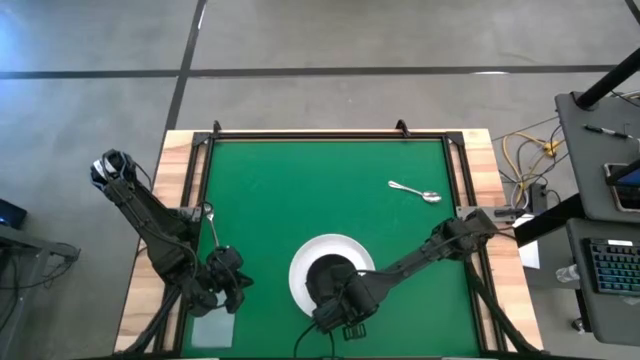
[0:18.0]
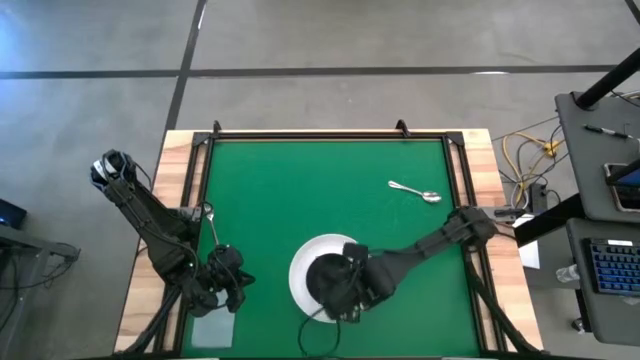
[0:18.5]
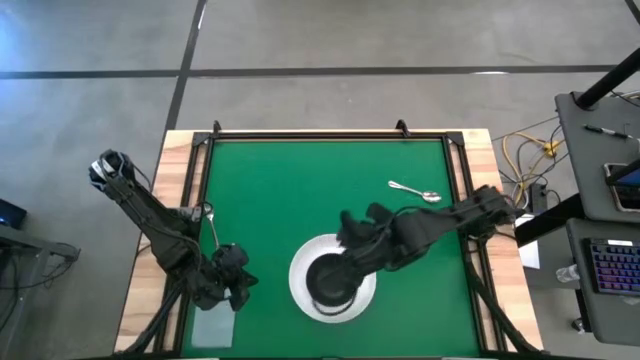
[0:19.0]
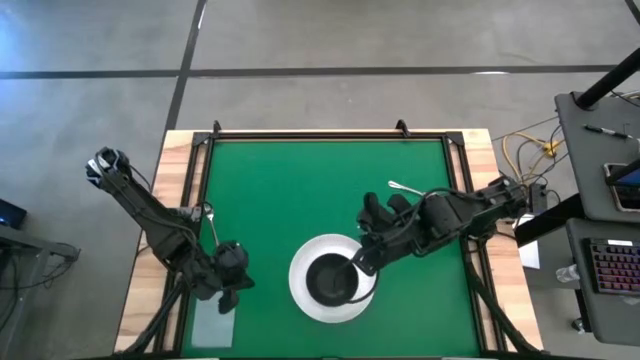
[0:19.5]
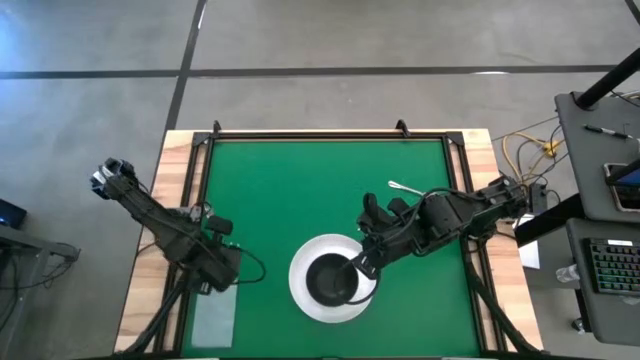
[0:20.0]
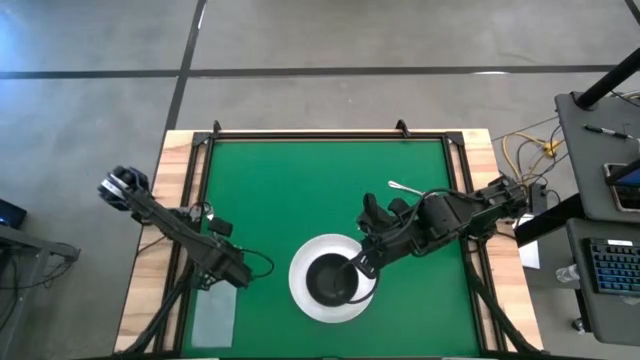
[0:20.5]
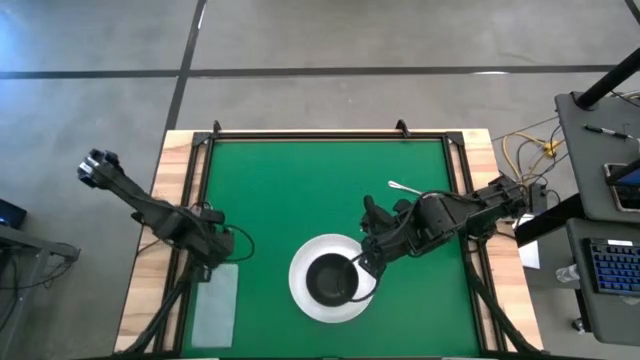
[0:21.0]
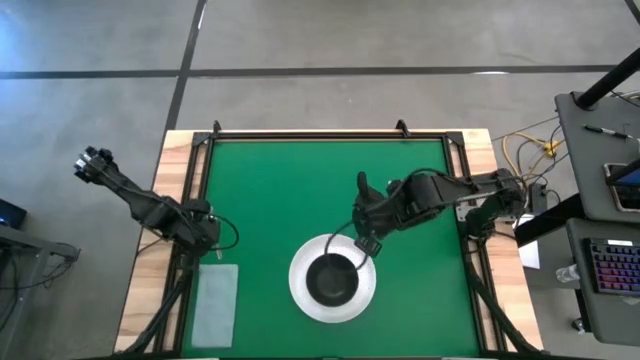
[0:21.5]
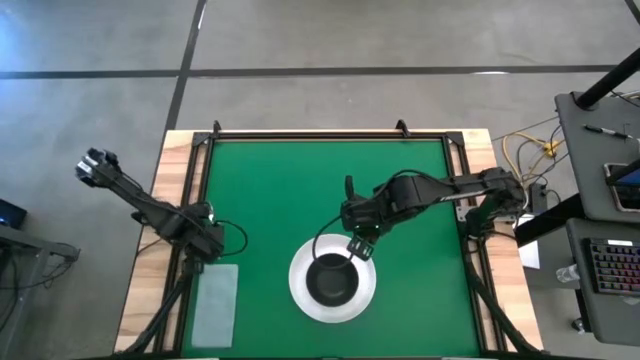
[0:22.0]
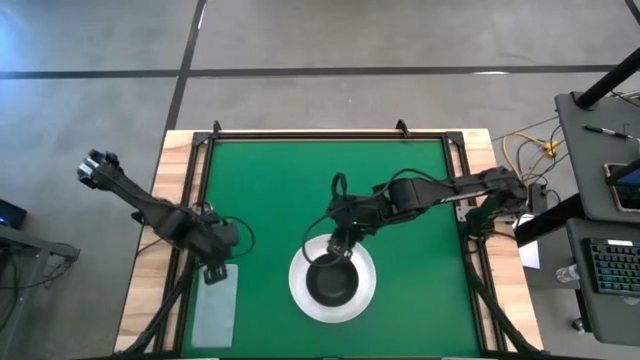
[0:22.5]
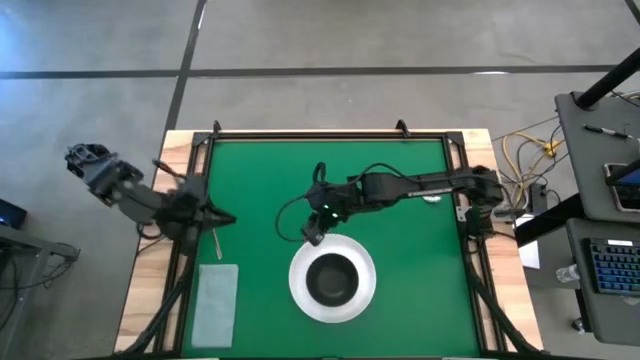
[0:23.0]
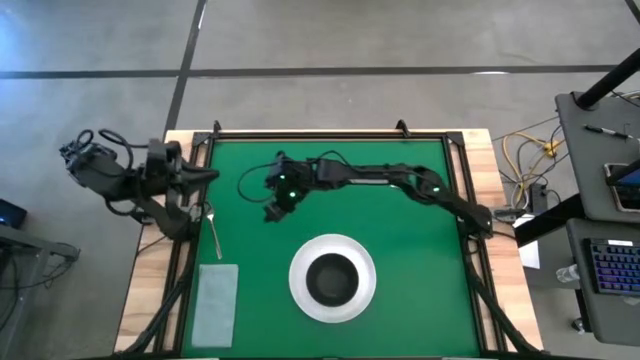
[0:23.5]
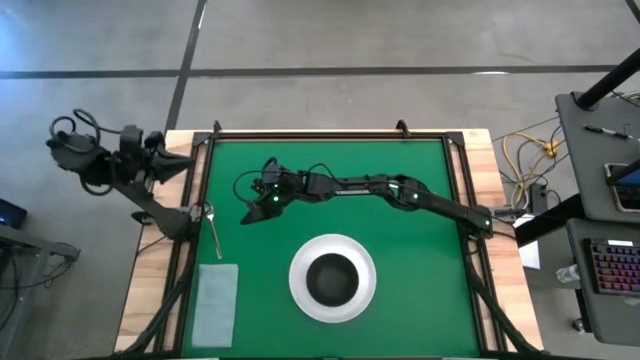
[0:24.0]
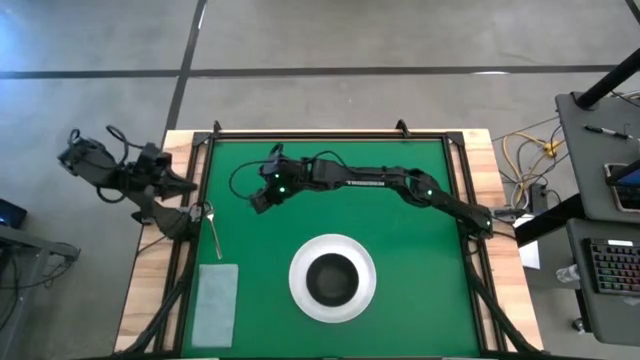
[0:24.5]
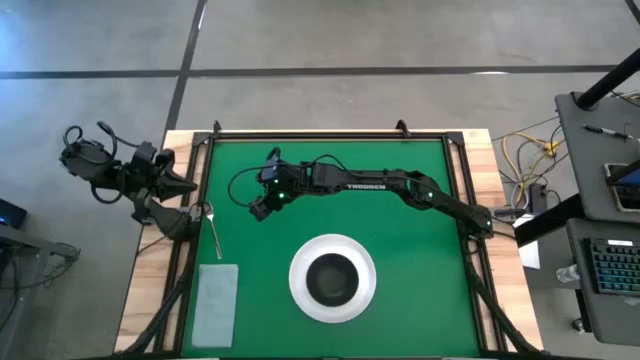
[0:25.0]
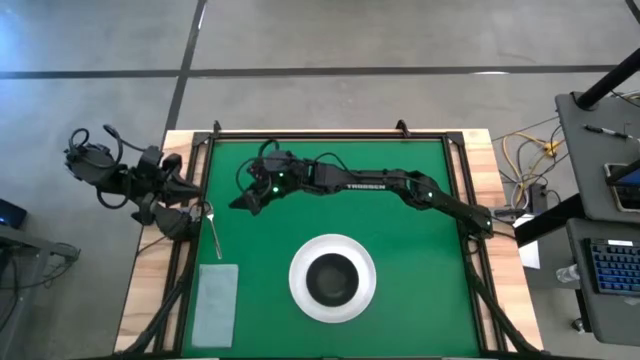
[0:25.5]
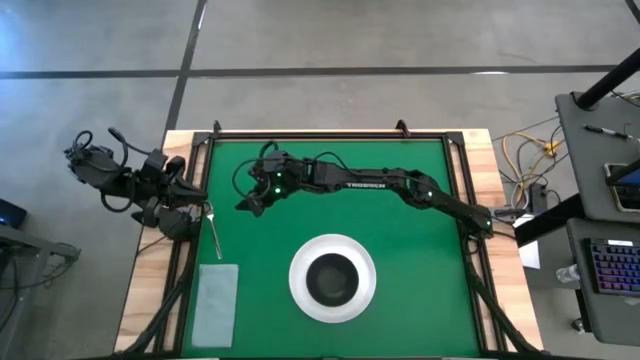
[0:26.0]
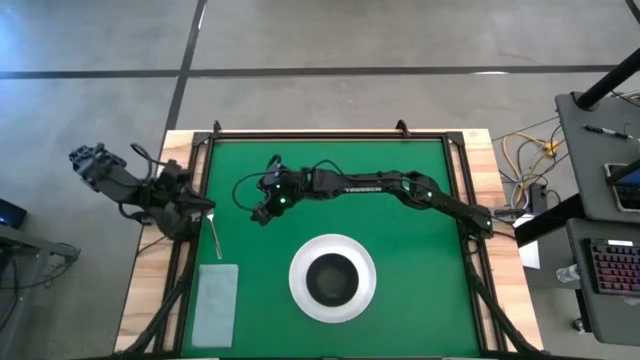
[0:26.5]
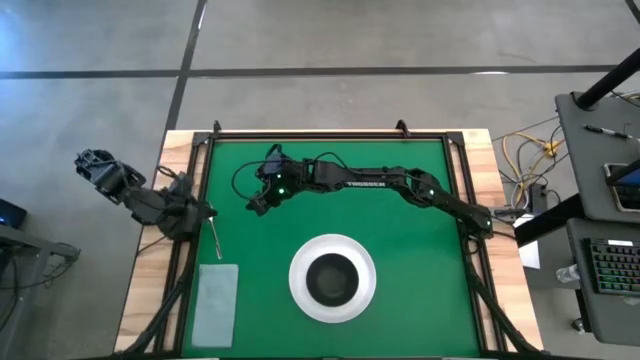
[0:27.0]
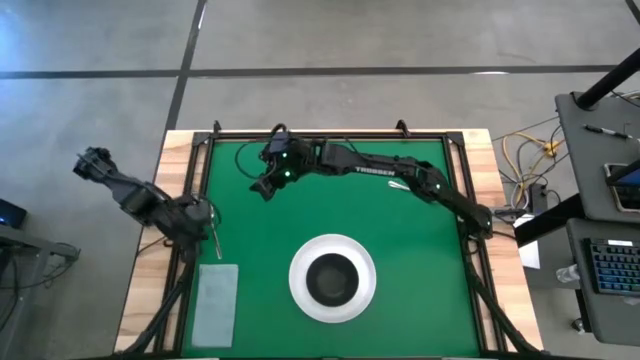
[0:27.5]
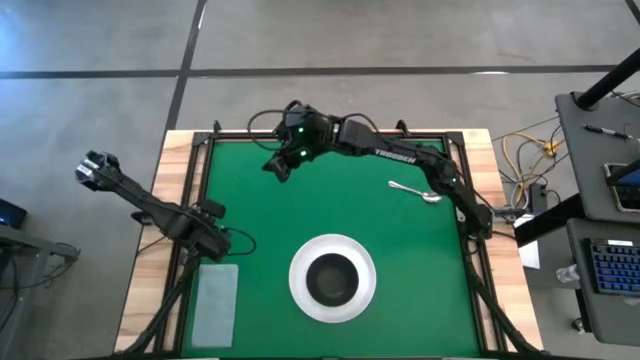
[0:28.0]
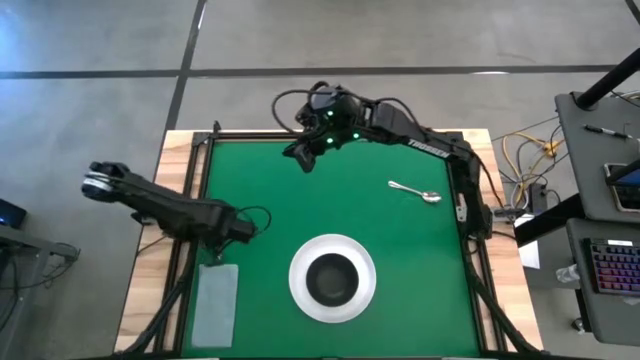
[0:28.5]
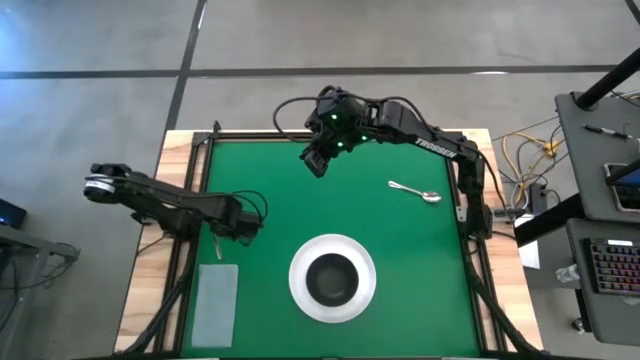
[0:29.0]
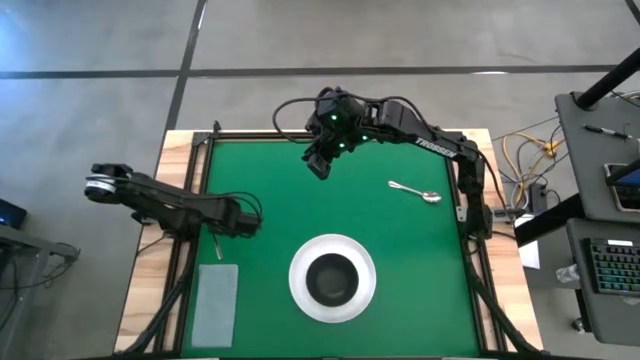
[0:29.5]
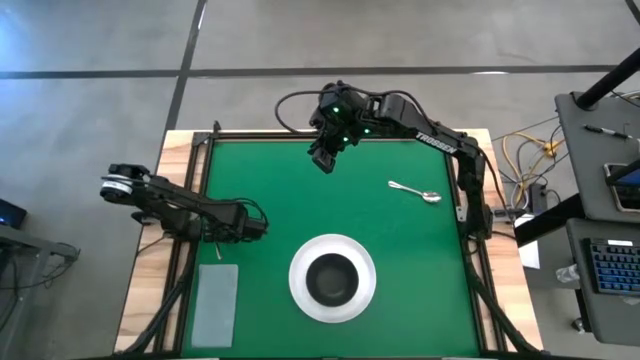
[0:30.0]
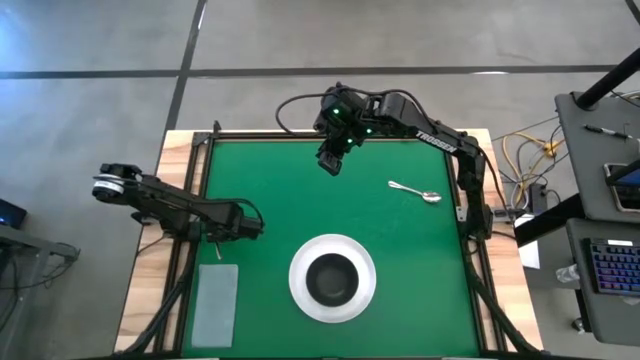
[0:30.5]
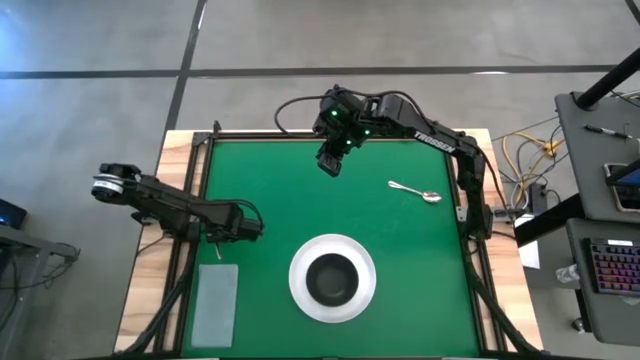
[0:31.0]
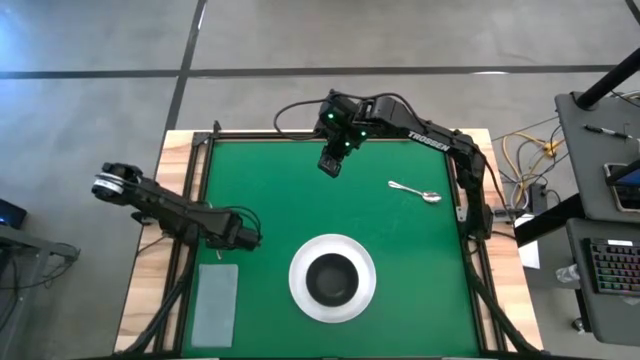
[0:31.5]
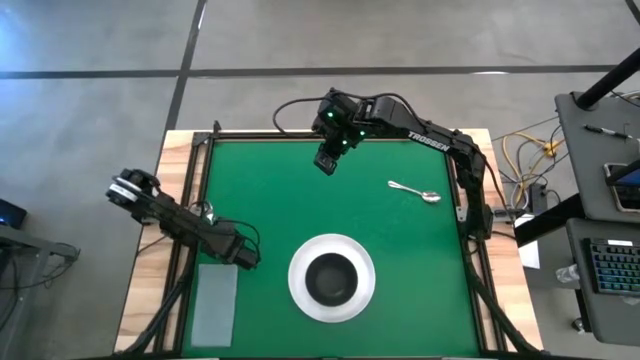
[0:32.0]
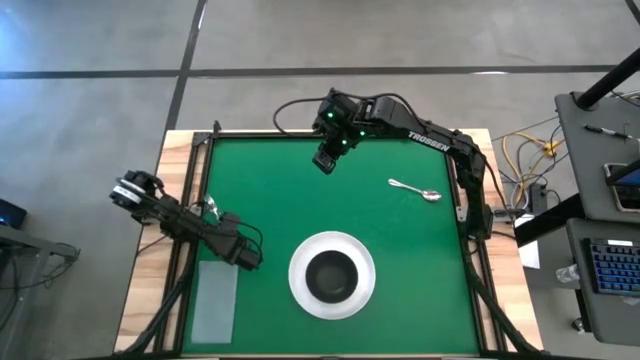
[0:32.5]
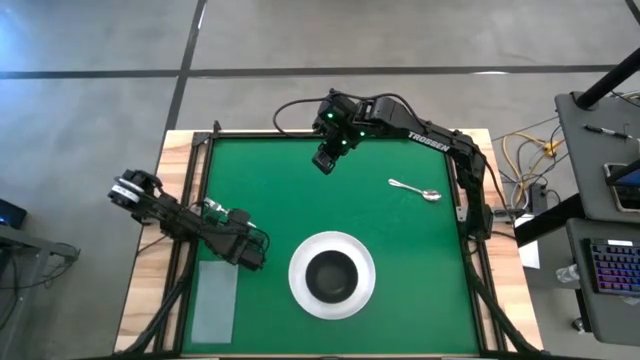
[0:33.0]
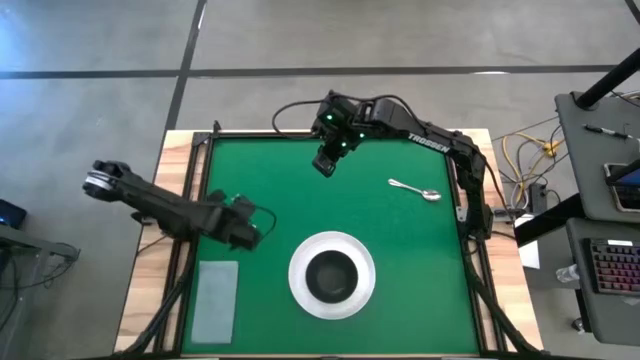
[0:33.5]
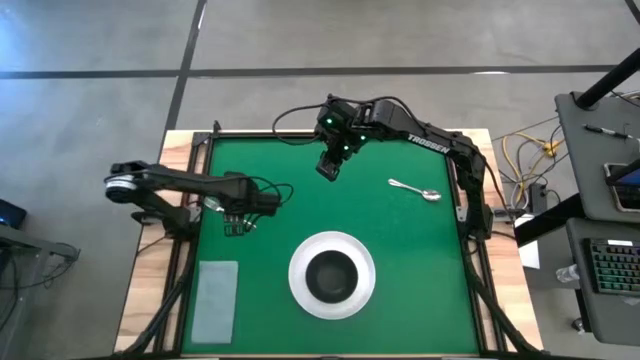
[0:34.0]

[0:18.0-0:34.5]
Task: Set table place
Put the fork beside the white plate on the table

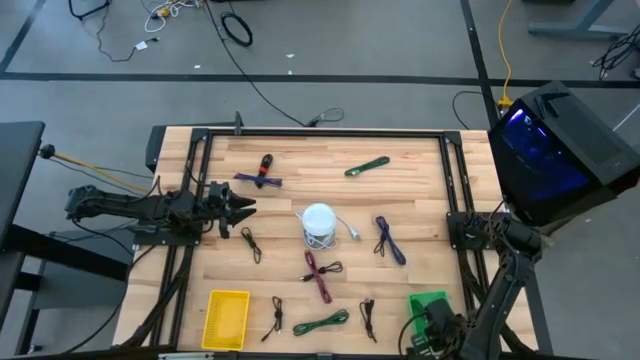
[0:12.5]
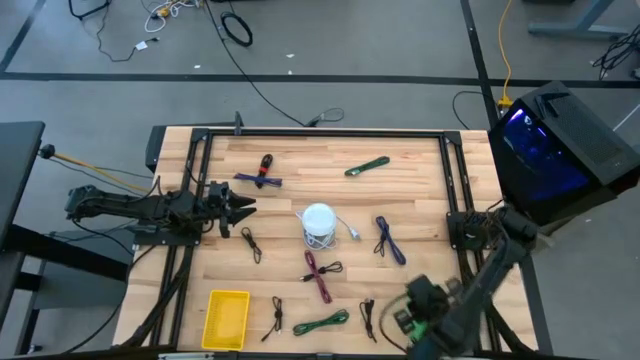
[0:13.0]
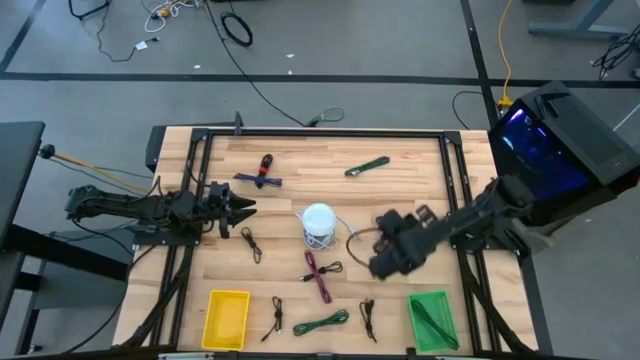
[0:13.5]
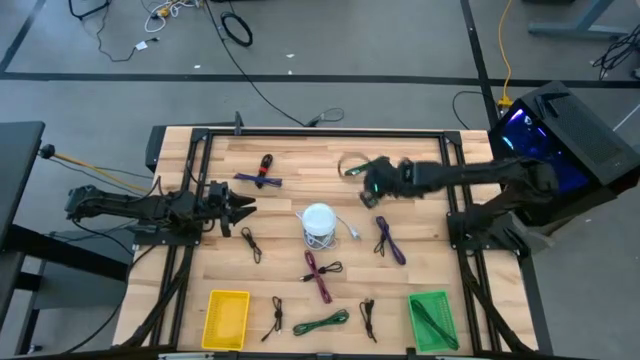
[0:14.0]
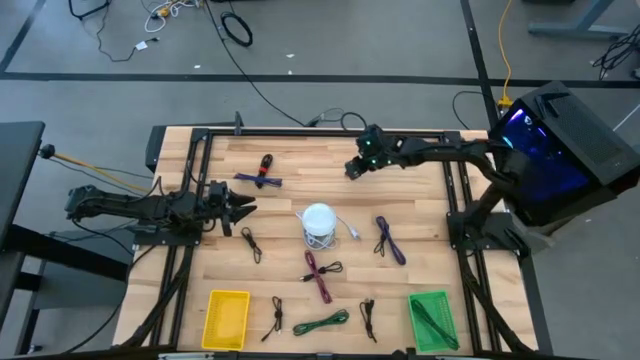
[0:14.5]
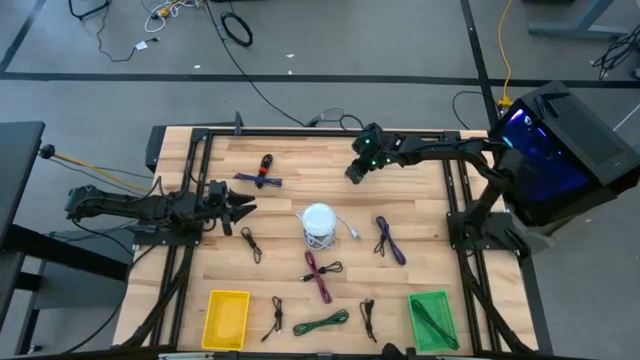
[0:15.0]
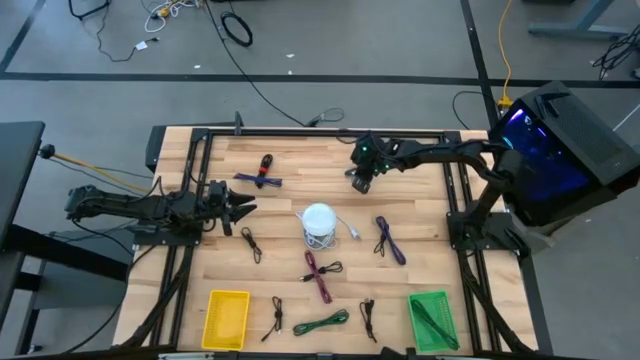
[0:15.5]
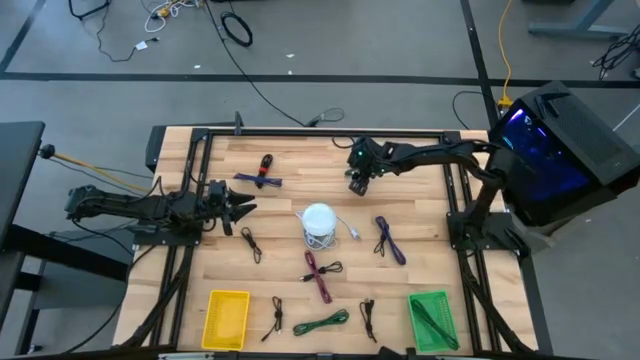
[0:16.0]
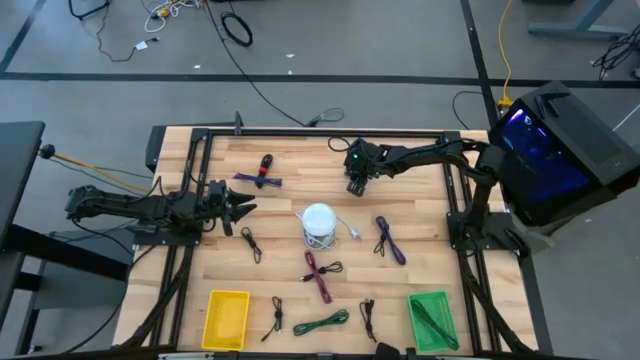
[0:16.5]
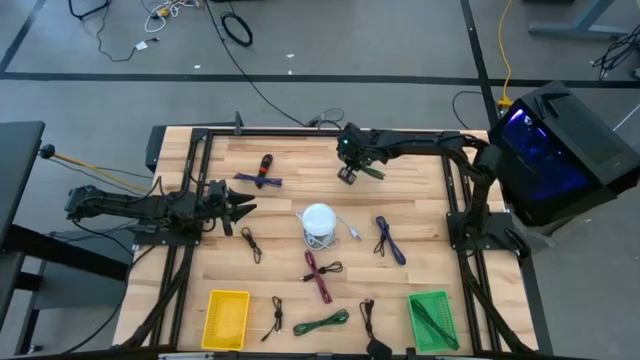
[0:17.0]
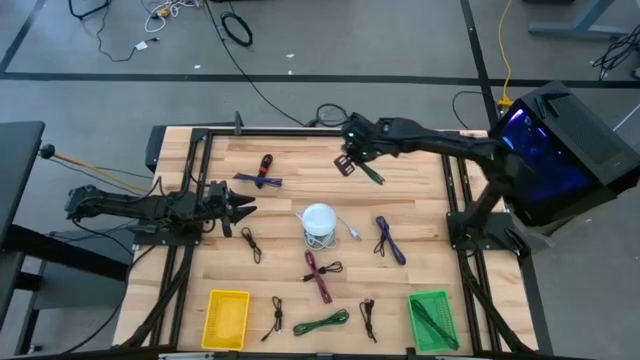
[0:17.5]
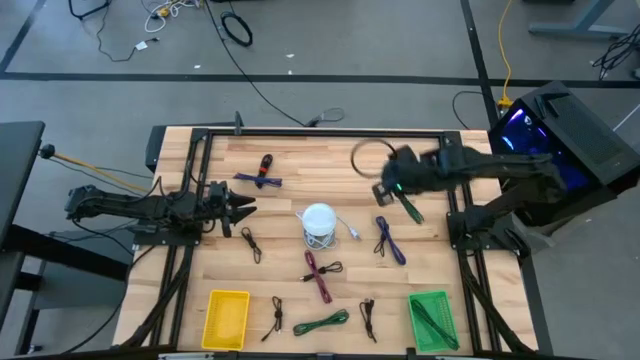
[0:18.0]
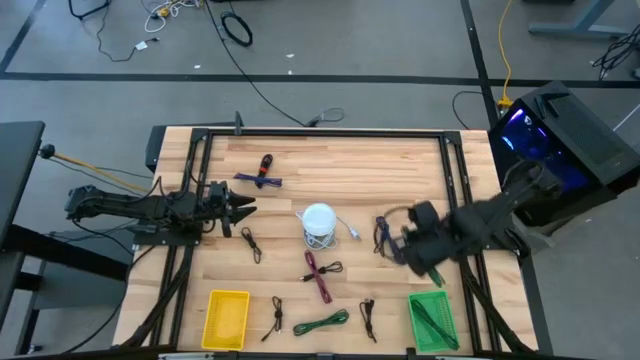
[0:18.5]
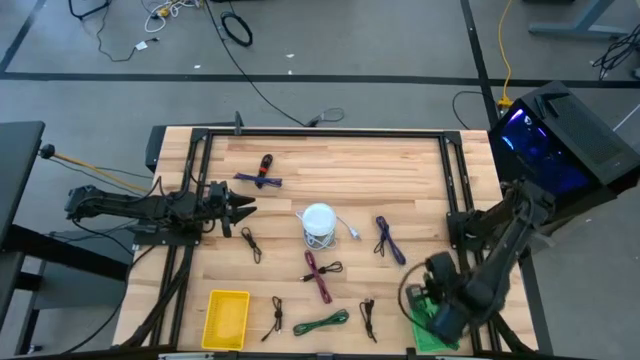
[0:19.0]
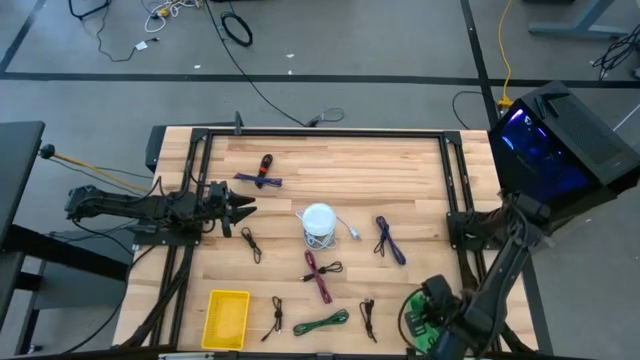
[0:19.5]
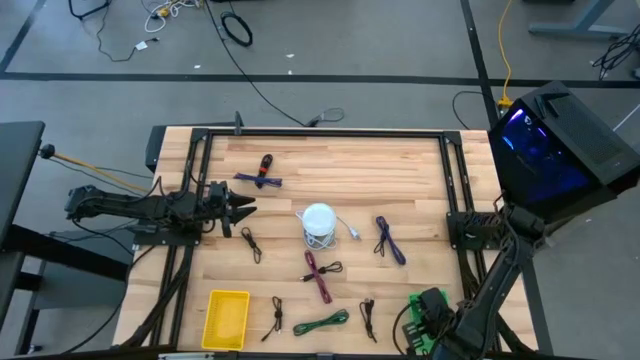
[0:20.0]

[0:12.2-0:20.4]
Task: Pick & Place USB Port
Put the green charger cable into the green bin
